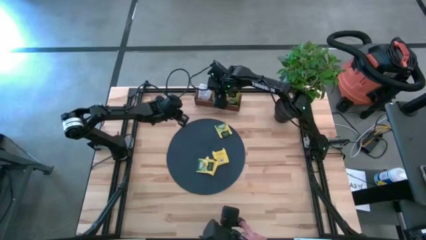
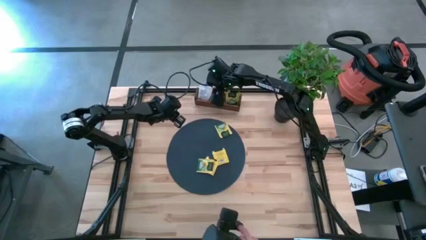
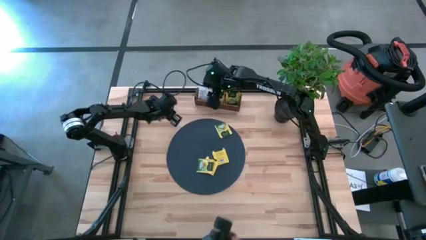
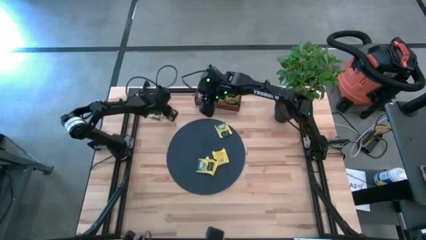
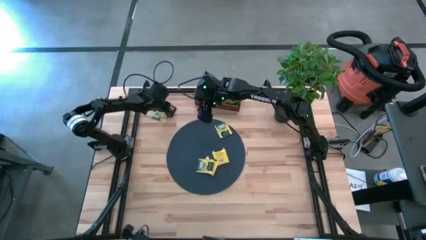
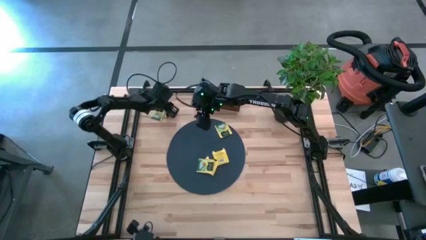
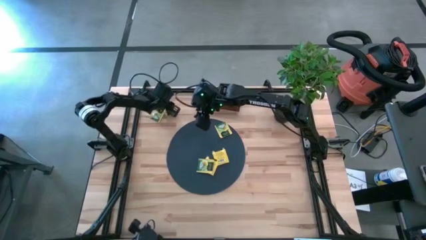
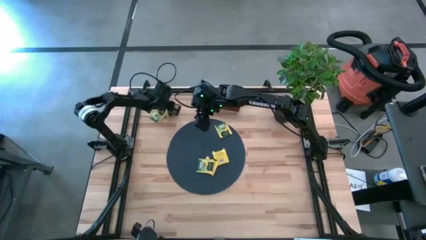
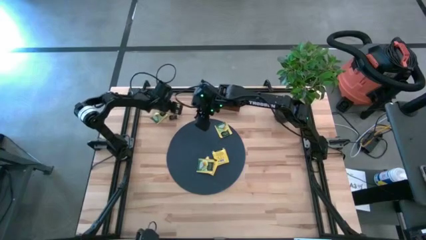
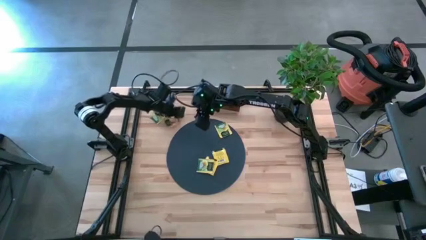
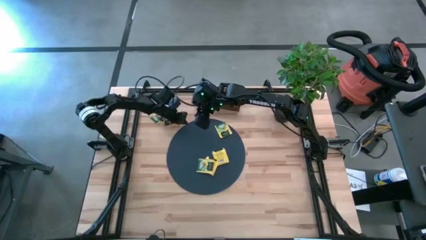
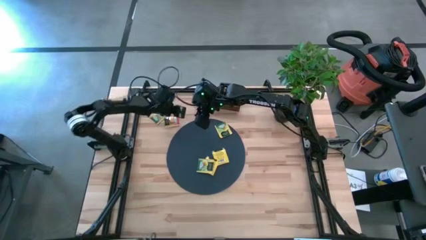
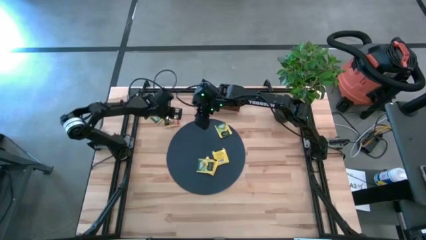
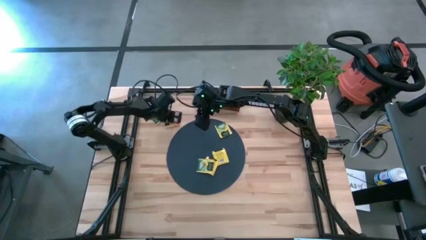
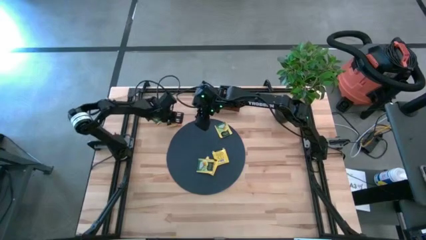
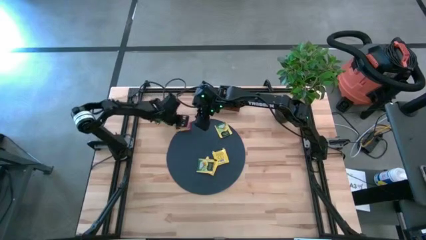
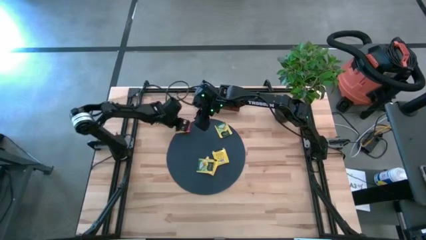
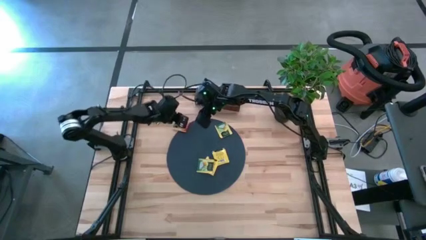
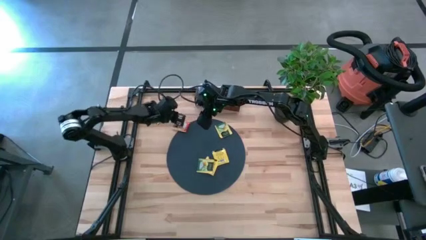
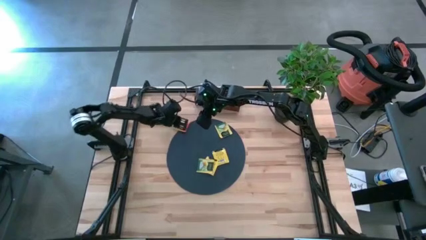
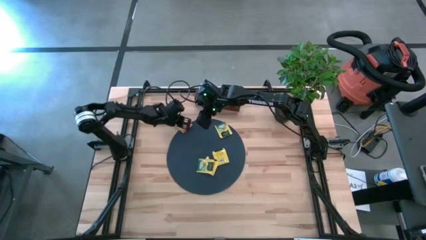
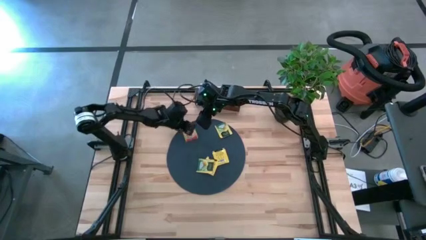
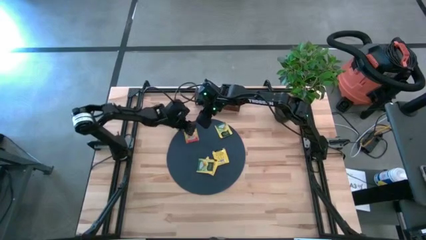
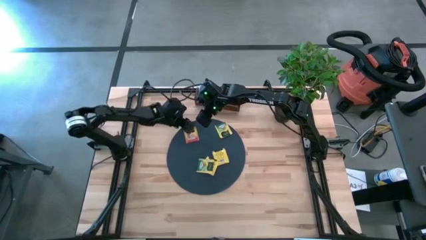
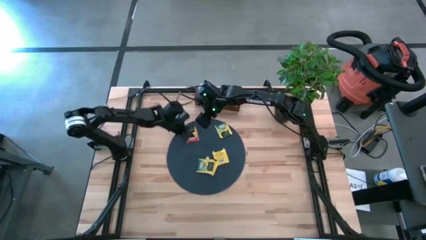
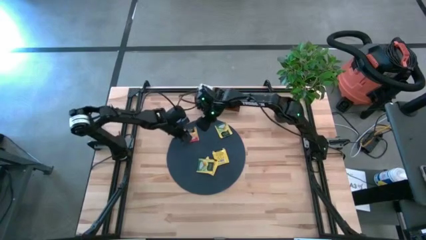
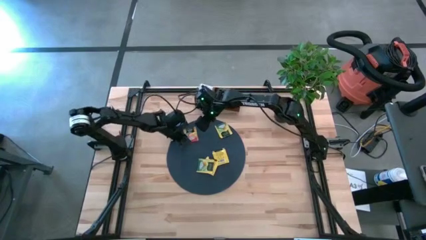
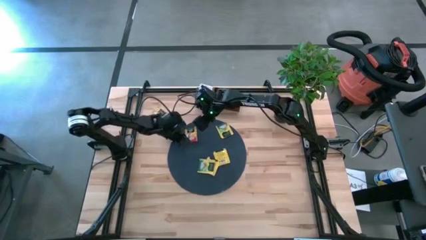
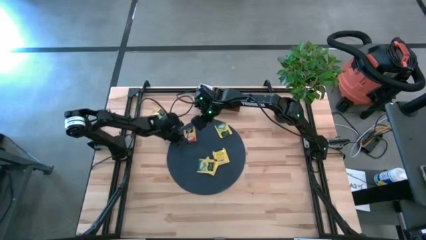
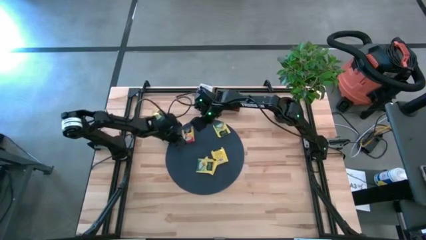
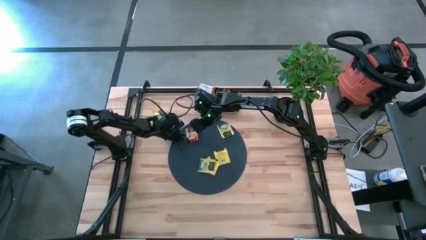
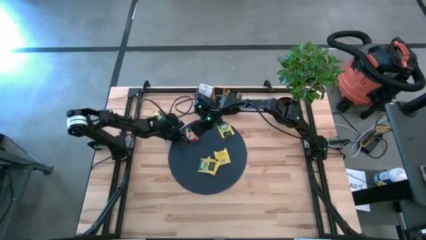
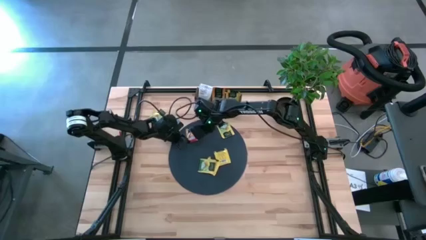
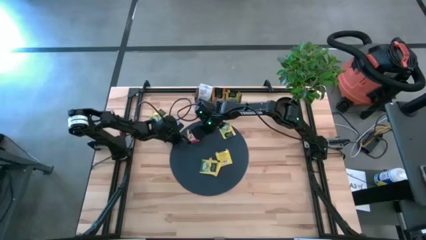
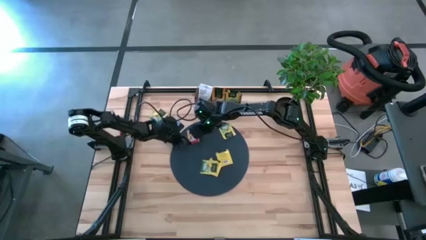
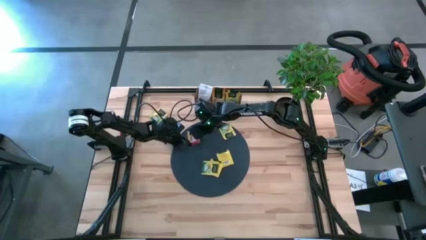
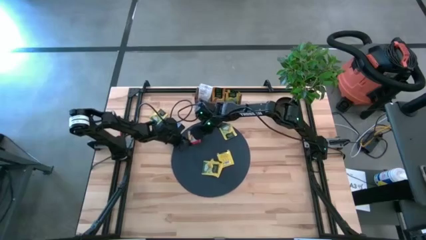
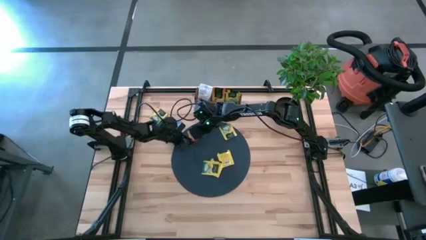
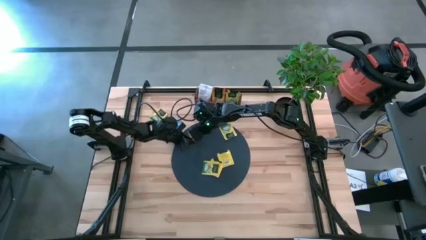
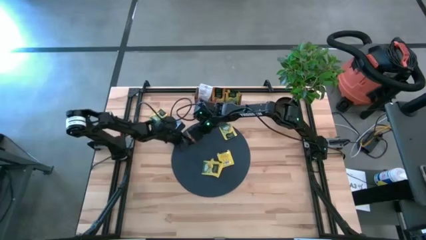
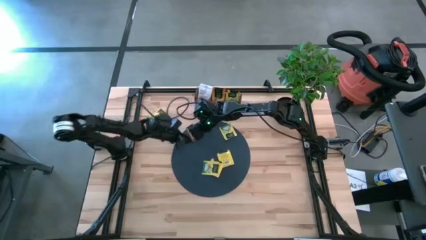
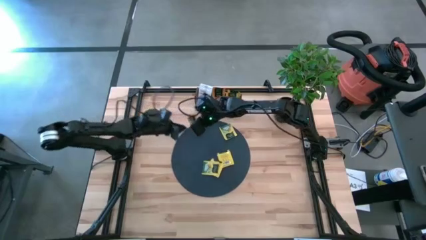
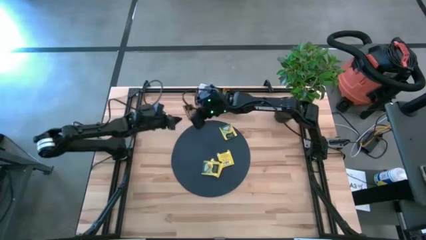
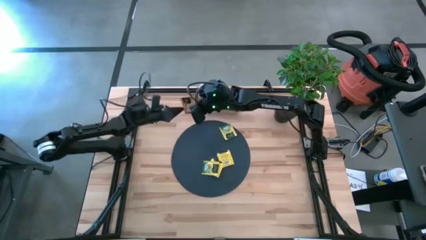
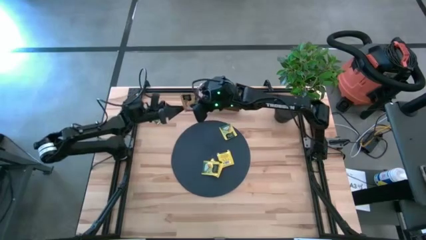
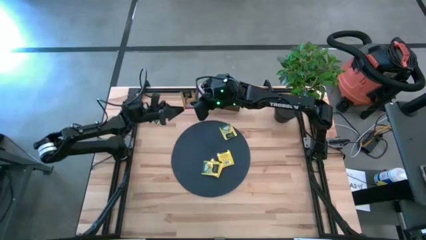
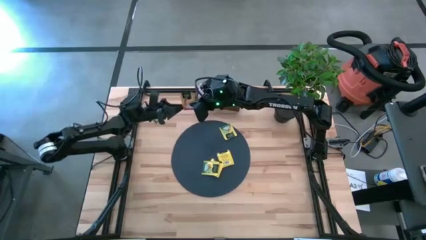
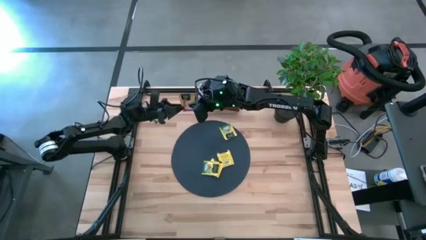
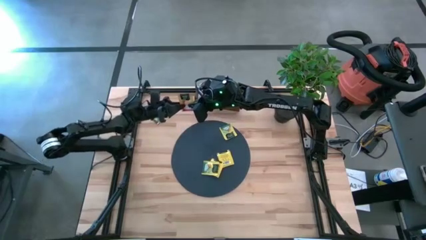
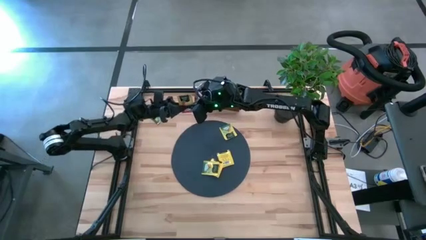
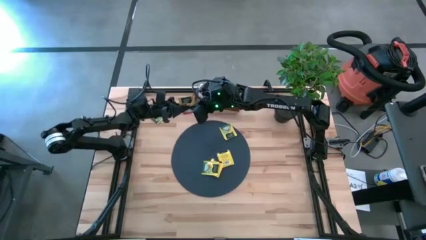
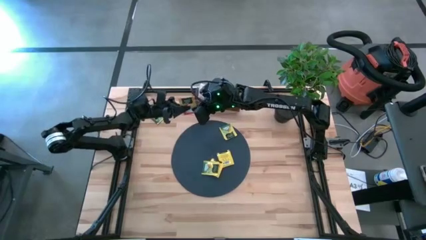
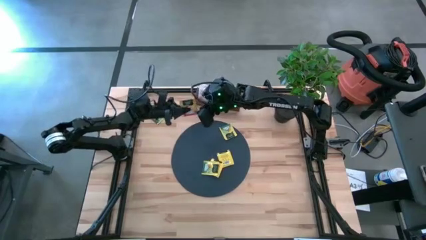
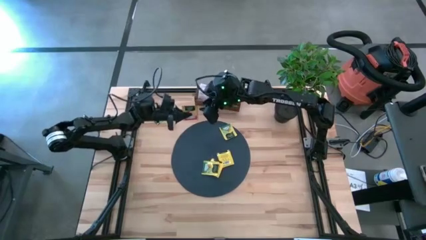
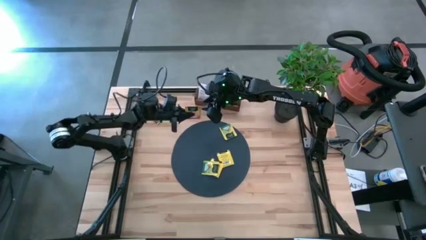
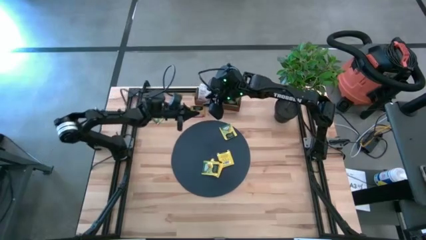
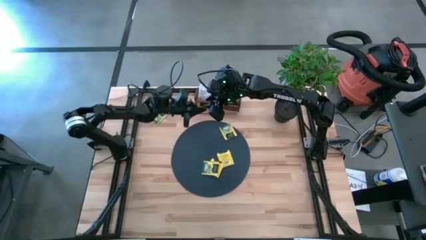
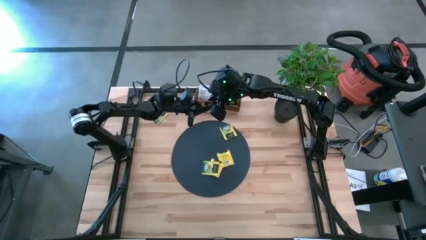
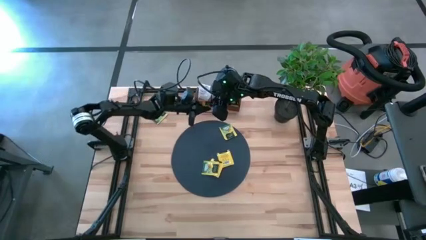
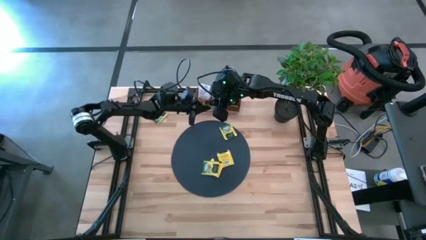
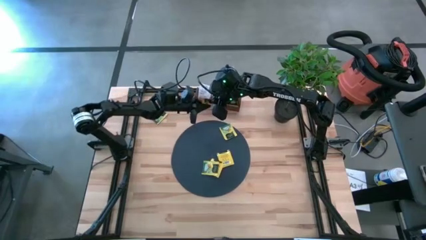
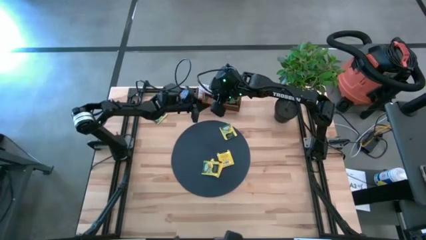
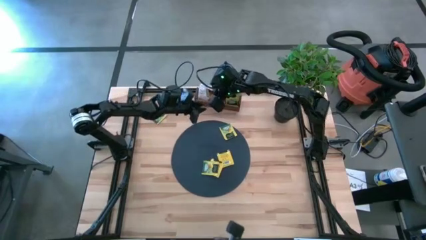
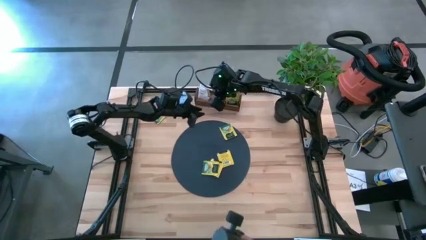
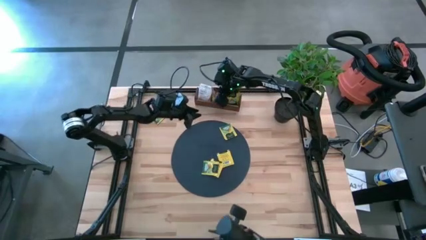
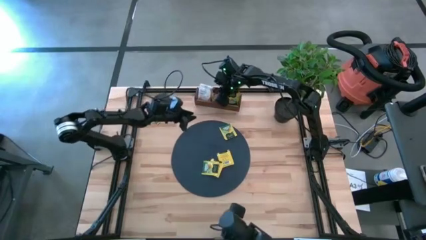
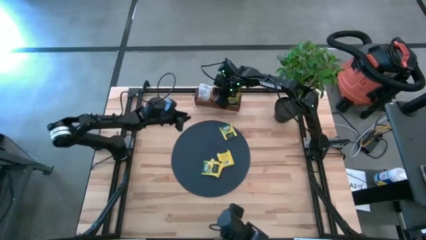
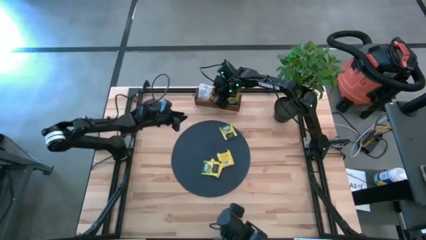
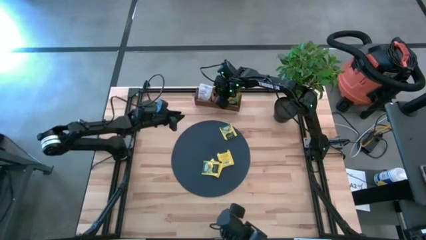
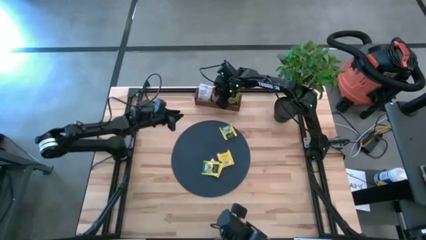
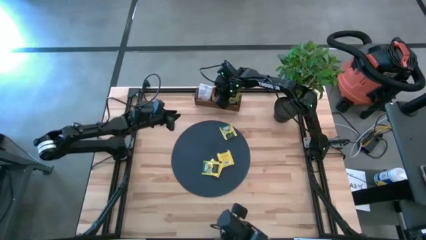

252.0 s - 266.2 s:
Task: Pick & Place Tea
Put the yellow tea bag into the middle section of the wooden organizer

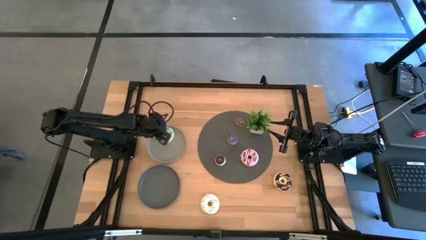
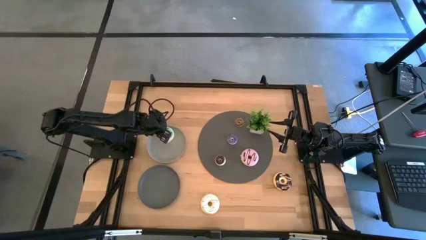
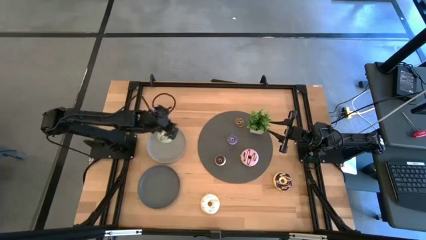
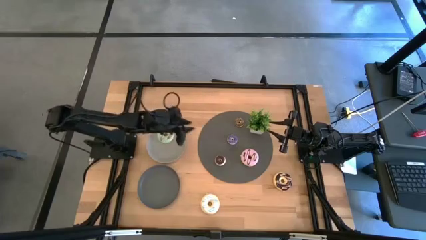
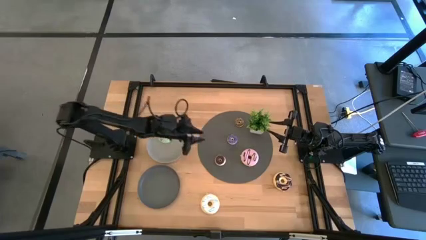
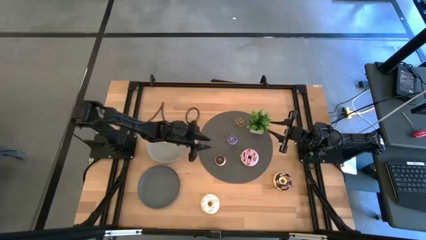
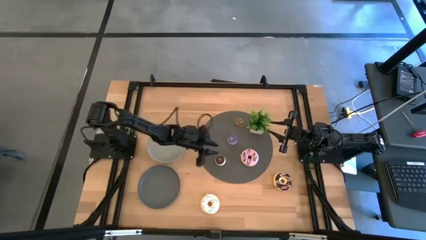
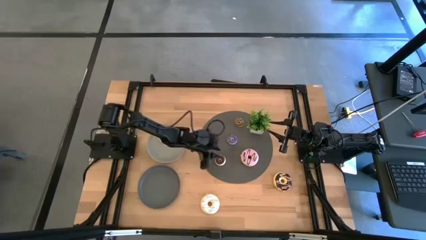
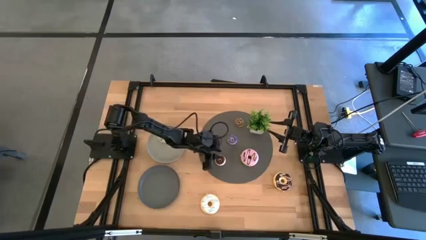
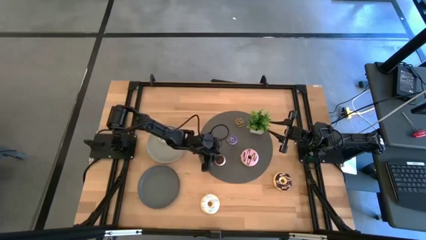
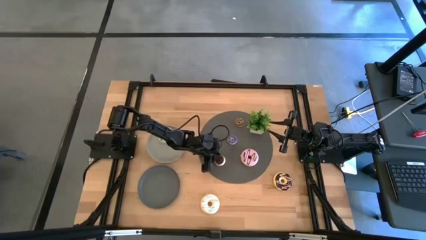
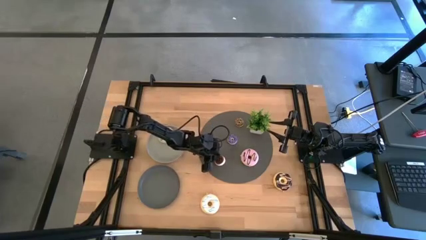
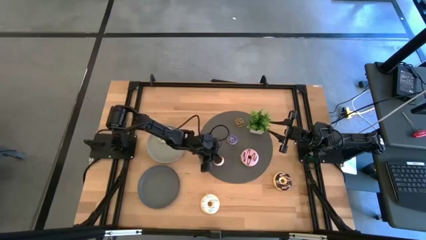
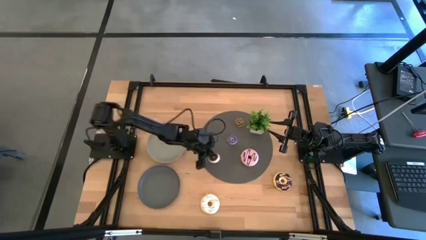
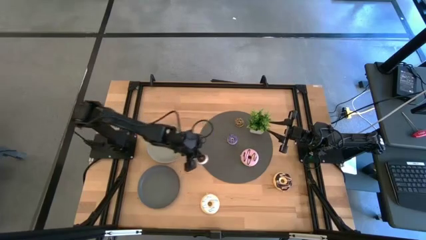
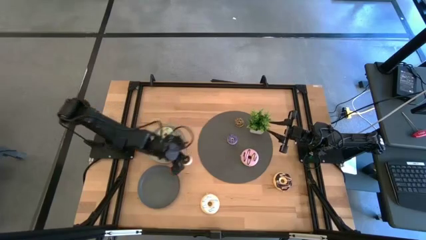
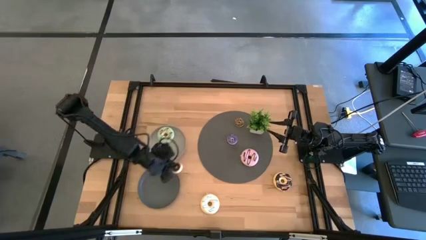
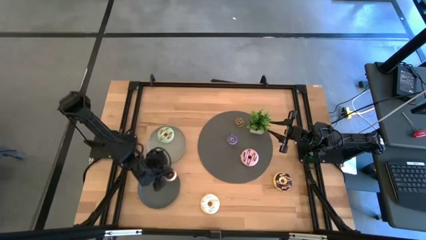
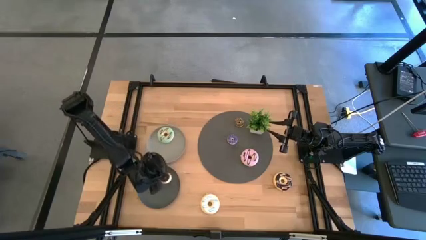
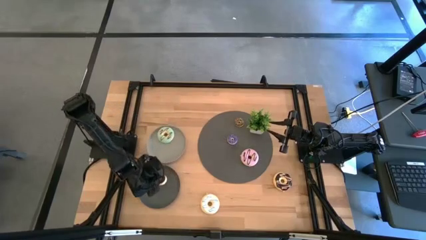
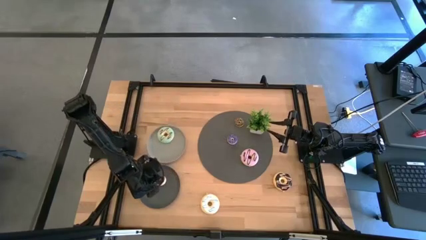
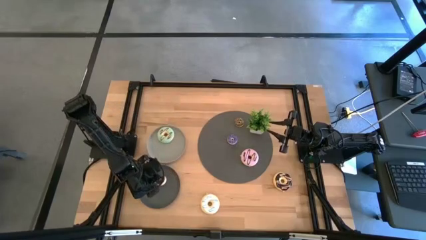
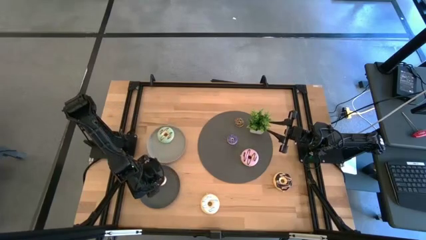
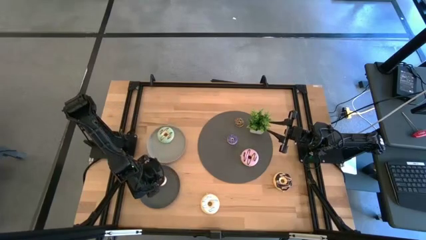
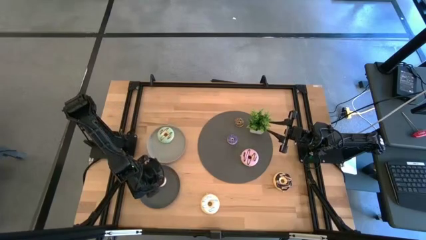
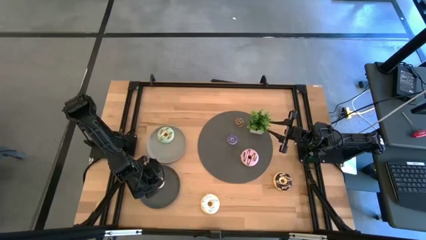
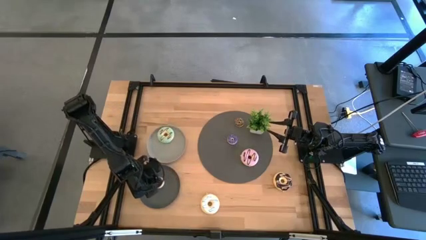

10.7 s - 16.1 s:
Task: Pick & Place donuts
Put the small dark brown donut on the dark gray plate
